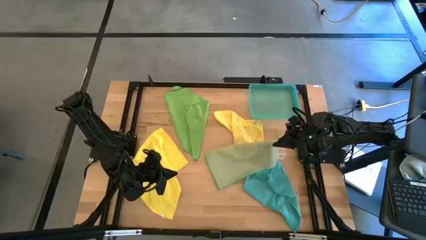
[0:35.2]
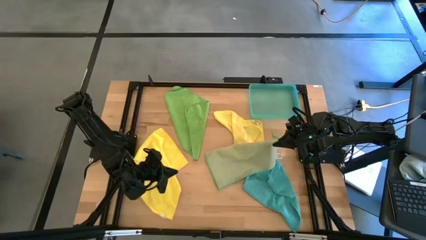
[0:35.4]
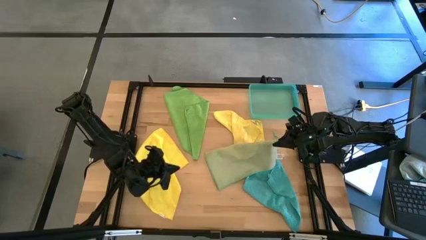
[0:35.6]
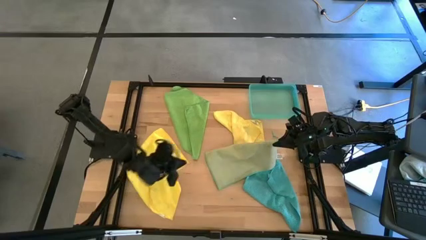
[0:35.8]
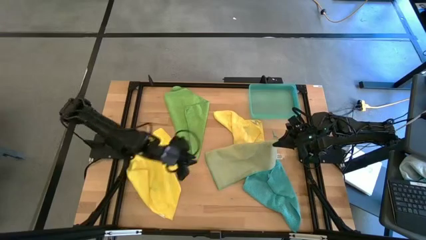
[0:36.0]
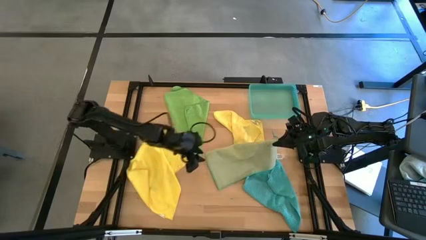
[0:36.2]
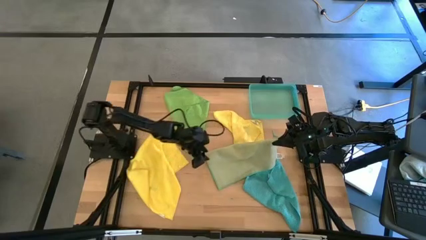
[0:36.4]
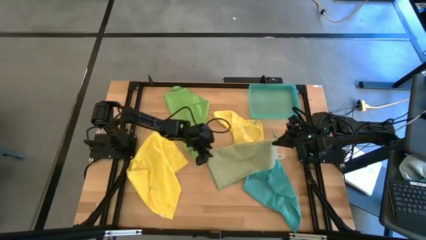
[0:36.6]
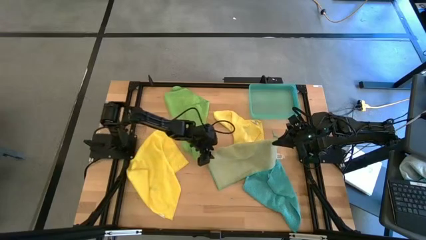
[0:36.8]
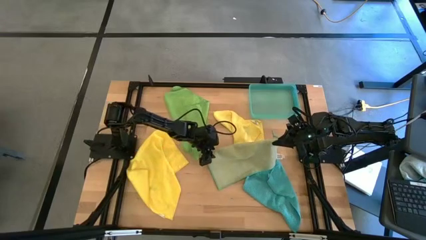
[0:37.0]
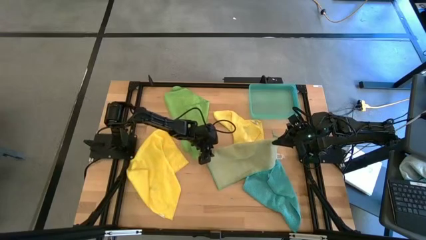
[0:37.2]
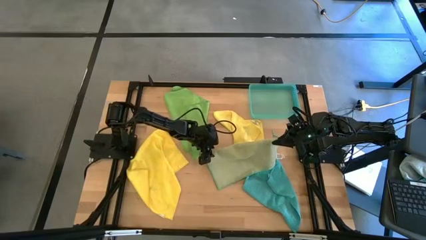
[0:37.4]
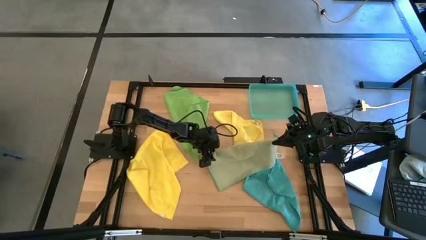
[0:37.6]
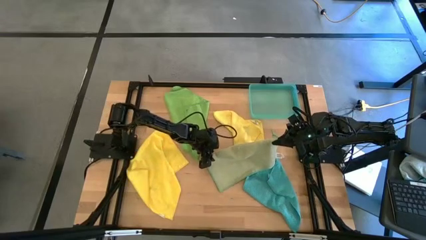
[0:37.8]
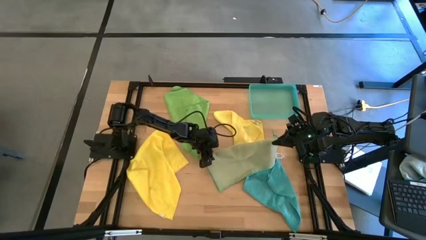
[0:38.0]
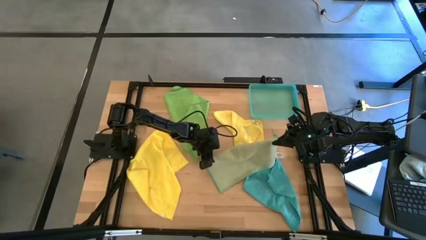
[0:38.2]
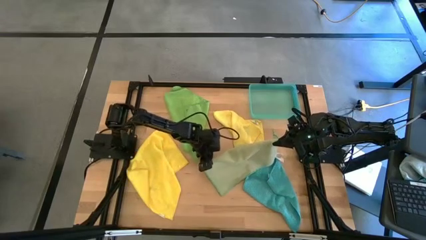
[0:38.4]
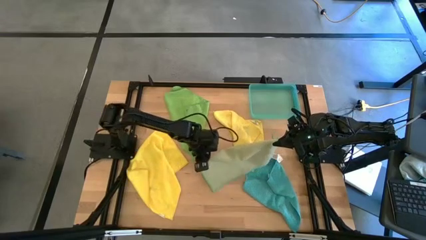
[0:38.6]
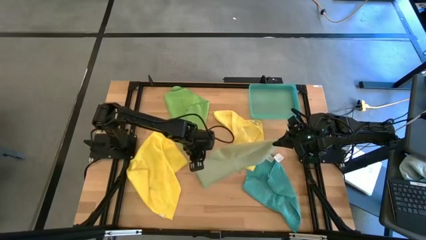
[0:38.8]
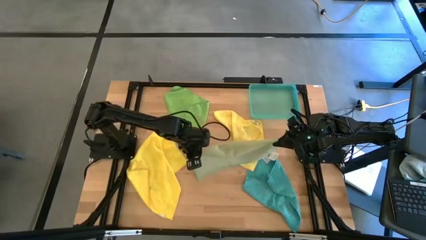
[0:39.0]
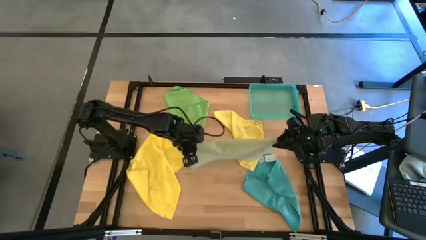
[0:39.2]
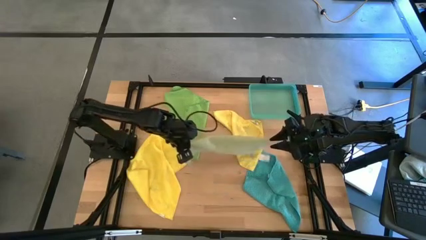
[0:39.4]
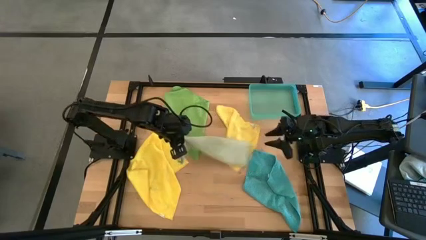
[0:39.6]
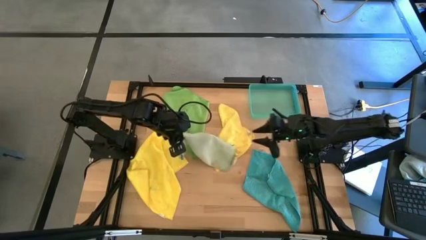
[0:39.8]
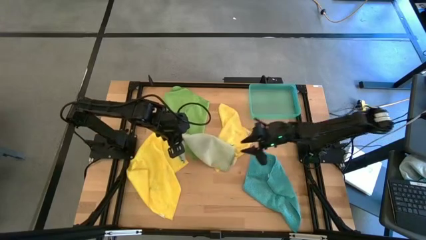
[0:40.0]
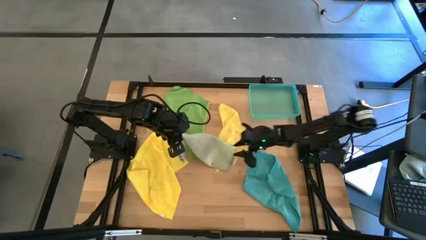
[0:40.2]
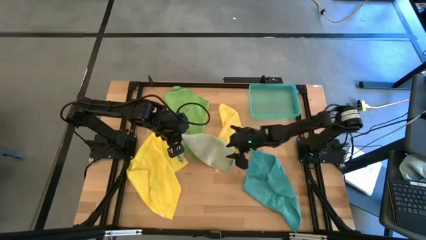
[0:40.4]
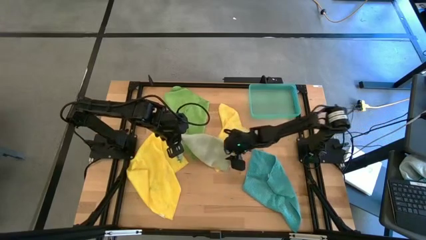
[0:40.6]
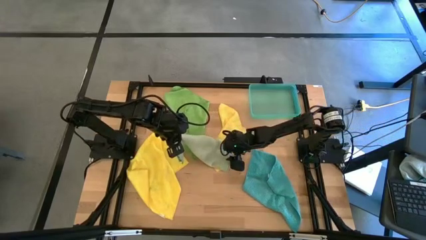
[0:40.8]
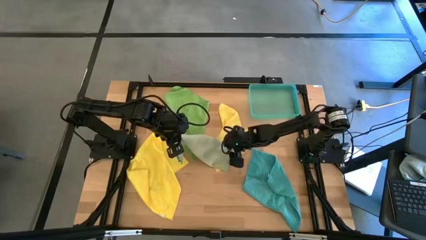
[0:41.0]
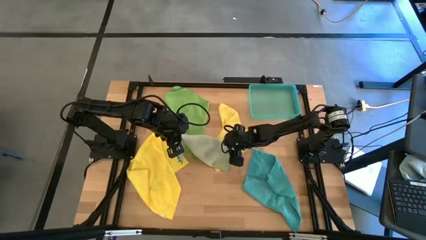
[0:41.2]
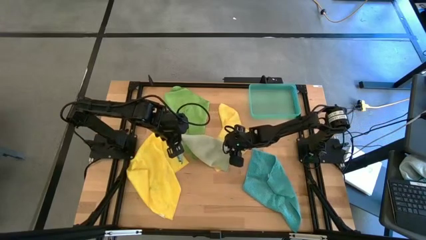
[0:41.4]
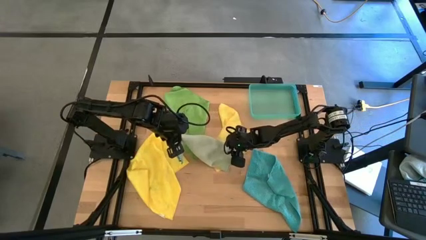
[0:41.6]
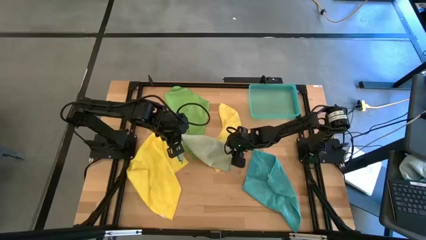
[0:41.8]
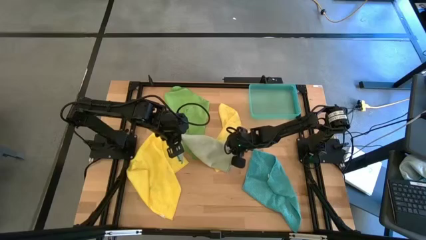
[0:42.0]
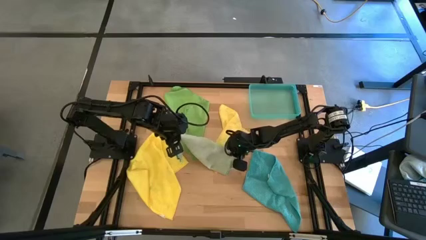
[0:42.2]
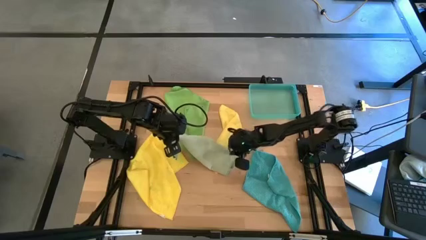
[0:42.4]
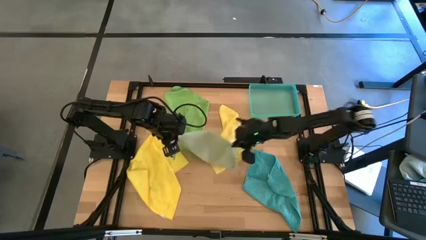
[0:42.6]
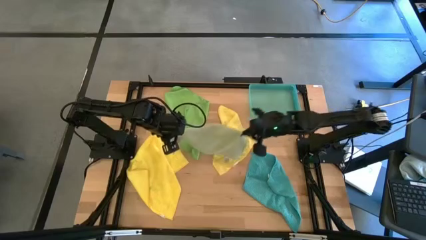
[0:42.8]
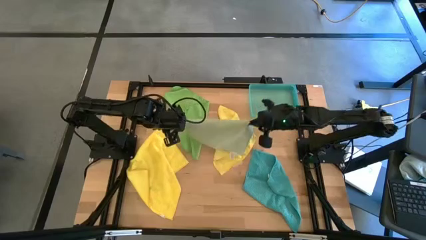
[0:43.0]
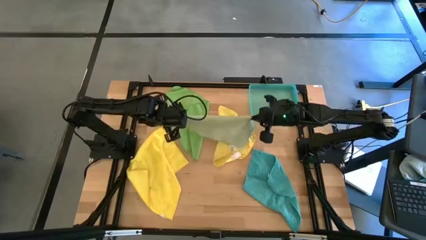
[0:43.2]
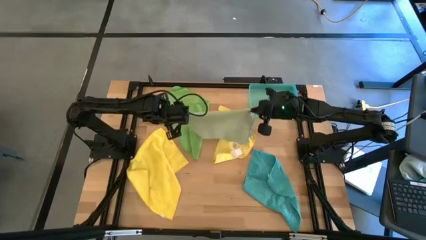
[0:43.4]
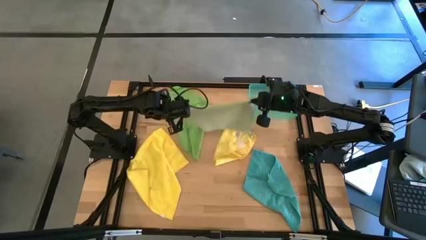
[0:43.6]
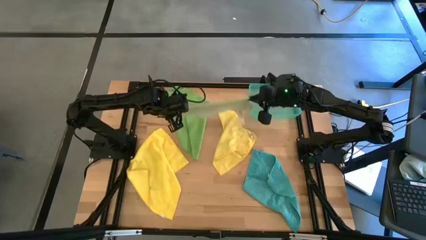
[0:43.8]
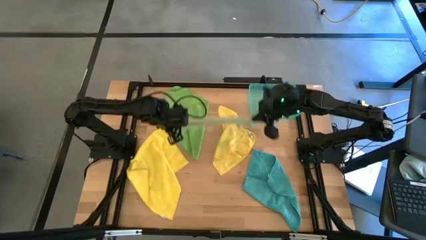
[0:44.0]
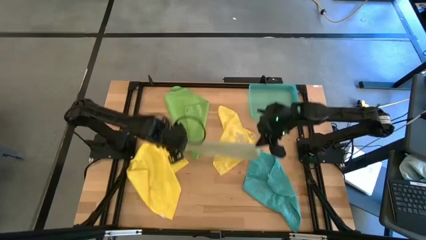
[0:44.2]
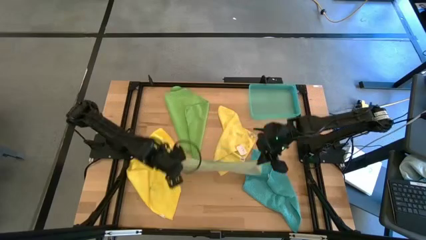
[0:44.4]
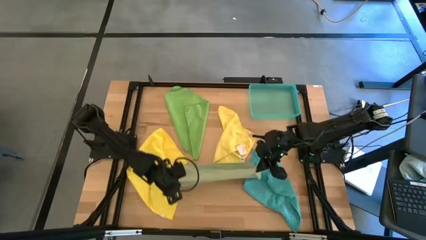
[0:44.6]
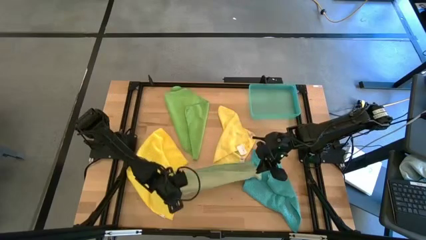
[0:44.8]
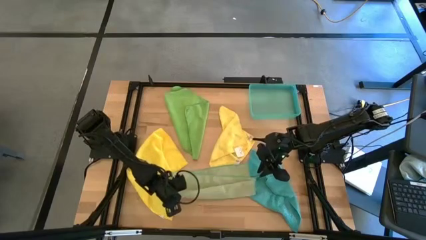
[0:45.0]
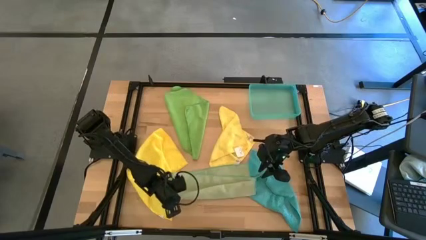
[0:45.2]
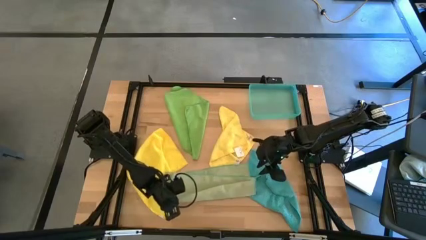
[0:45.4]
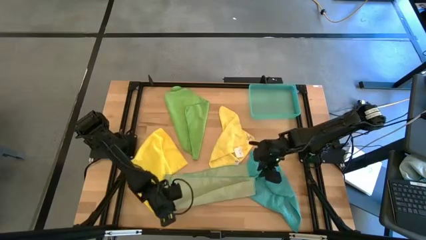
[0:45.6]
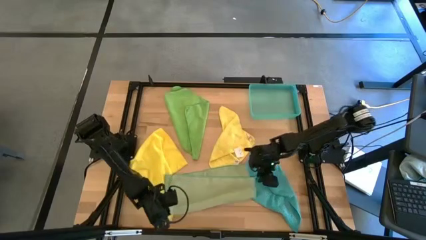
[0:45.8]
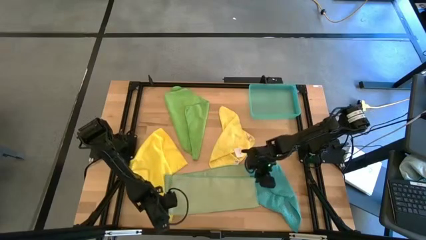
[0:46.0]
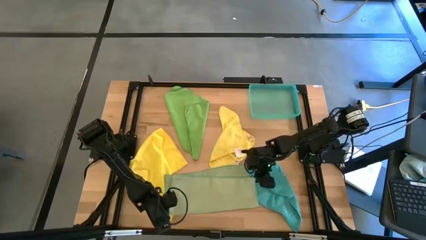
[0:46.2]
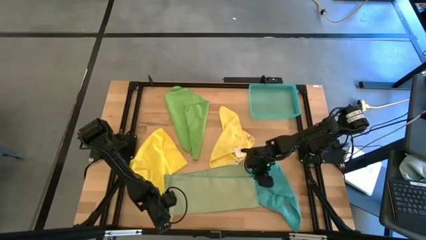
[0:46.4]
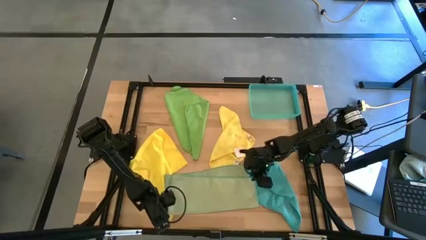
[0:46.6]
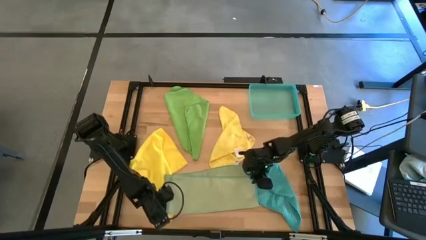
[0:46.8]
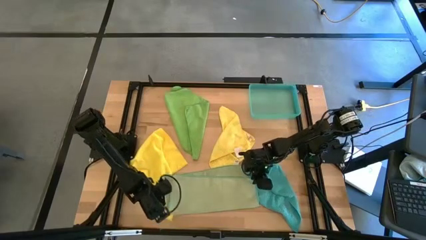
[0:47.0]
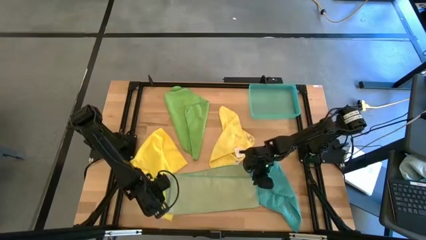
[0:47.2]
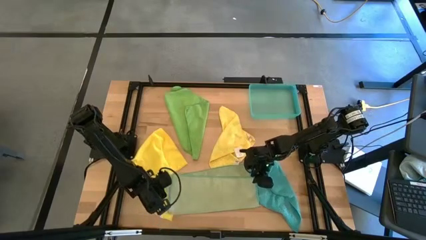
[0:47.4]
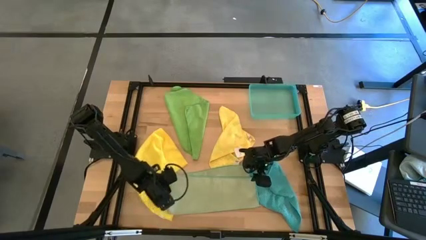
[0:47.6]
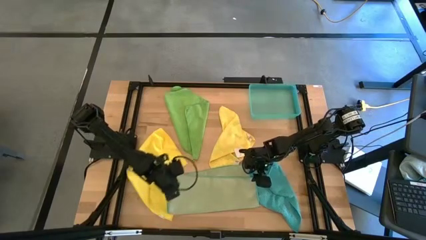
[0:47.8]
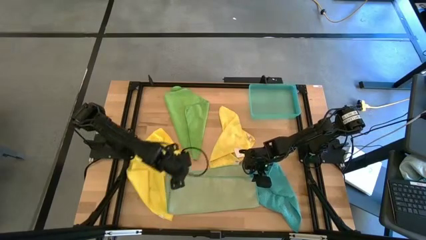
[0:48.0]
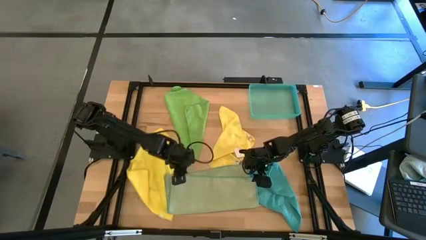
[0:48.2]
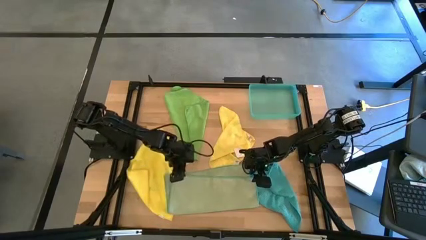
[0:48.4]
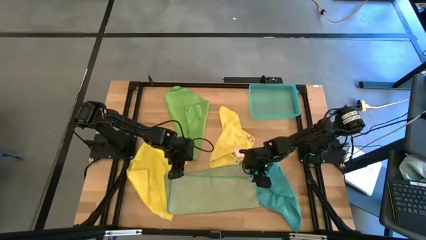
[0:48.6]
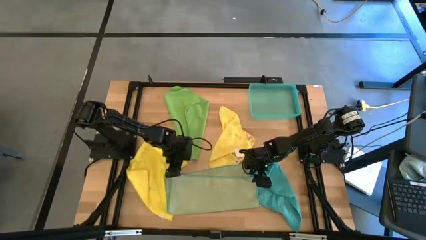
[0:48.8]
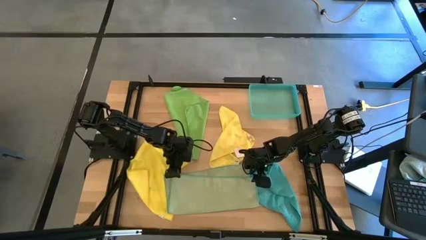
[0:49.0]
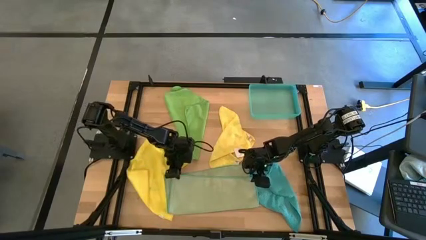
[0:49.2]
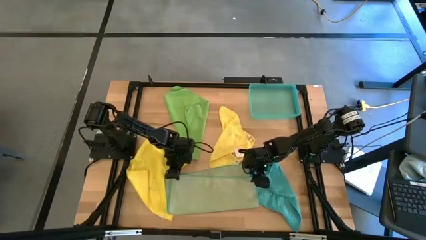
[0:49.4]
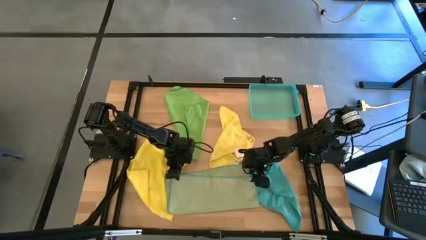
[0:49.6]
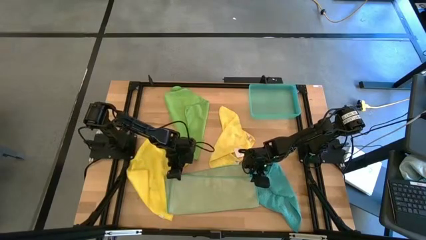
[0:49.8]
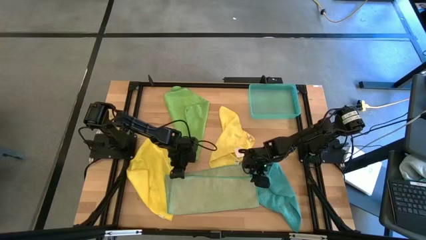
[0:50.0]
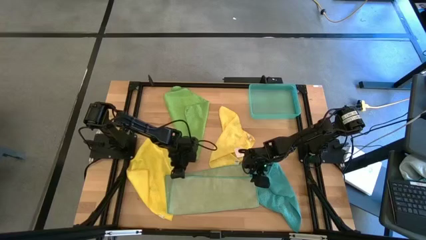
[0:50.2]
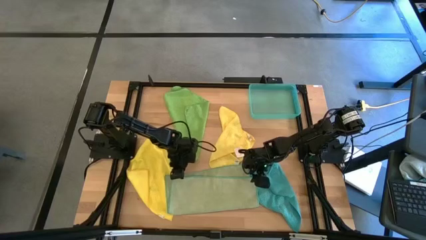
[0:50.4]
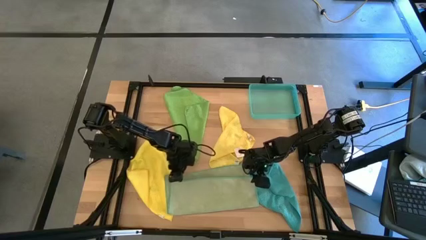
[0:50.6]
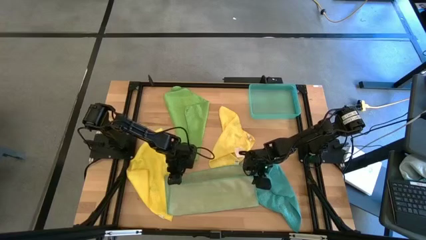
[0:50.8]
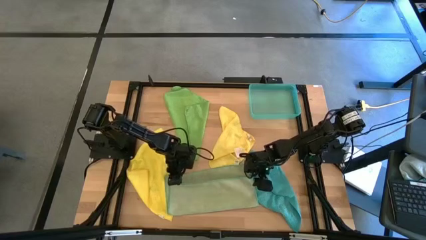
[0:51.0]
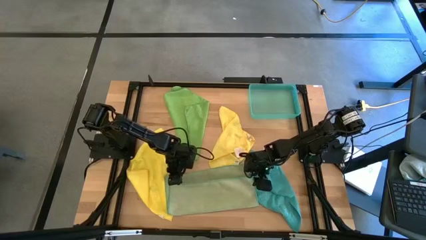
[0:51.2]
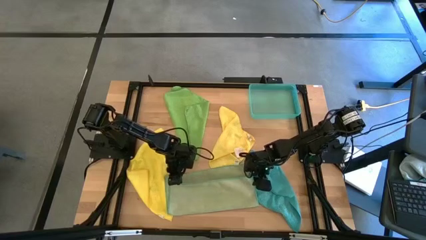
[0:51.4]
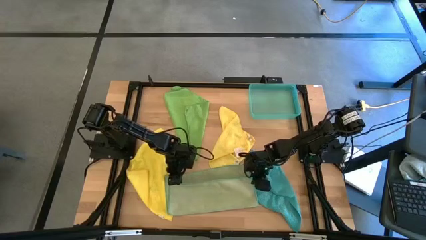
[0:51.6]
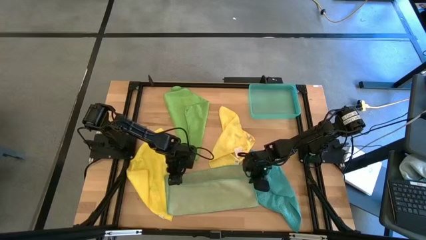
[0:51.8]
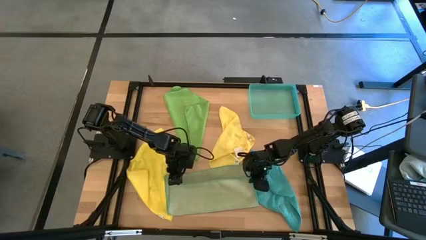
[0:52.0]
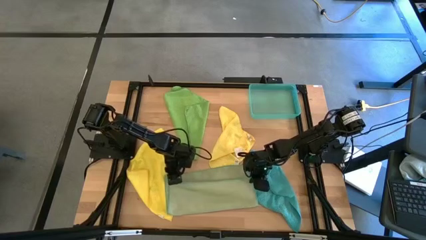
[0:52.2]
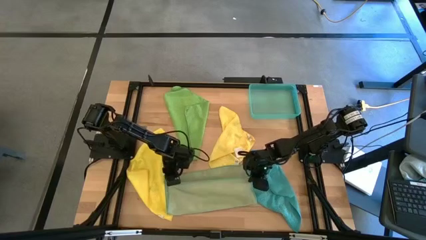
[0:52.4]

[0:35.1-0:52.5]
Task: Fold microfiber towels
Fold the light green microfiber cloth
